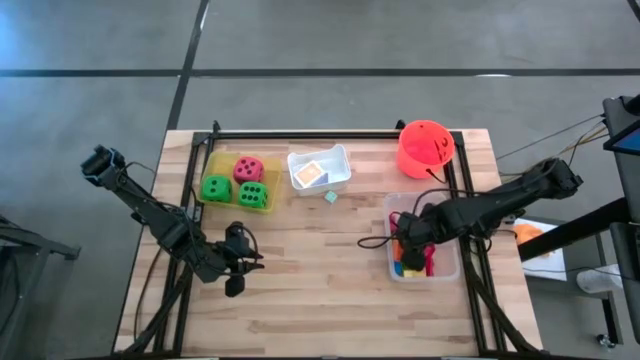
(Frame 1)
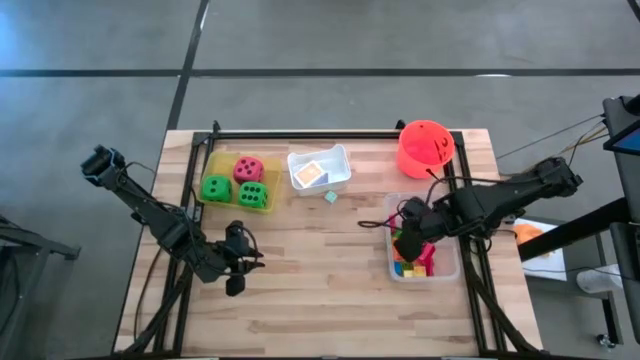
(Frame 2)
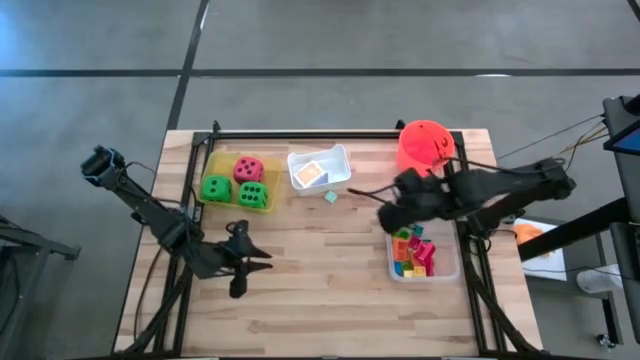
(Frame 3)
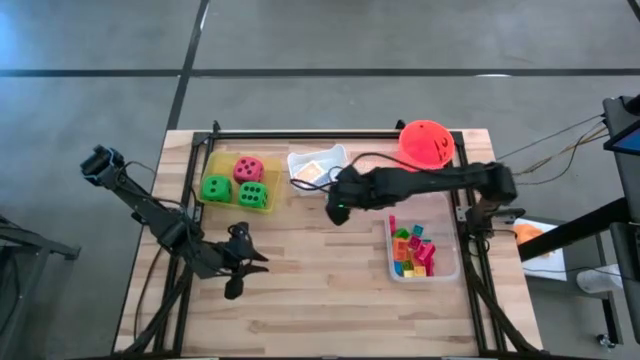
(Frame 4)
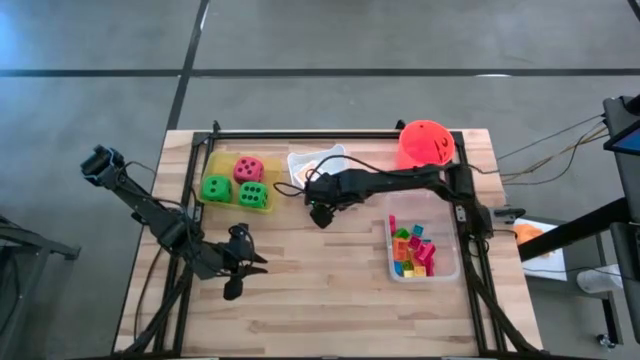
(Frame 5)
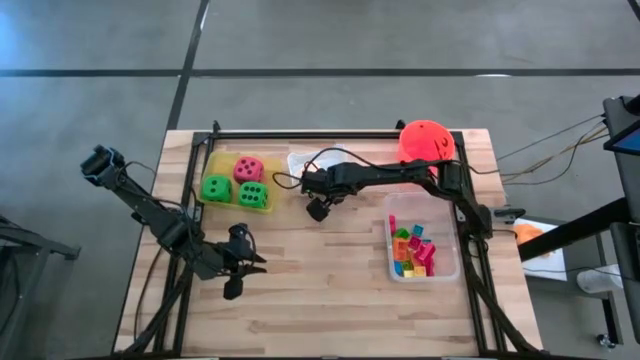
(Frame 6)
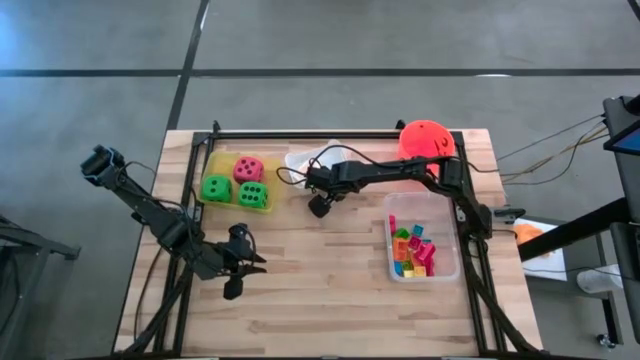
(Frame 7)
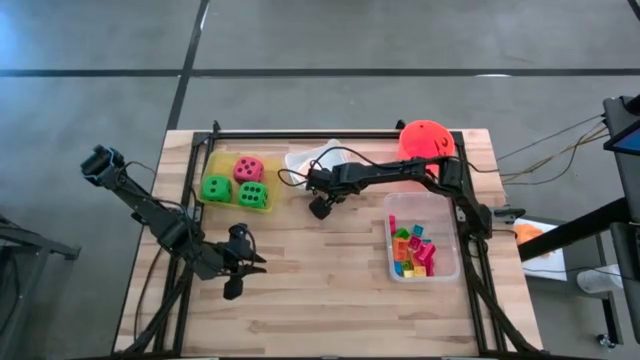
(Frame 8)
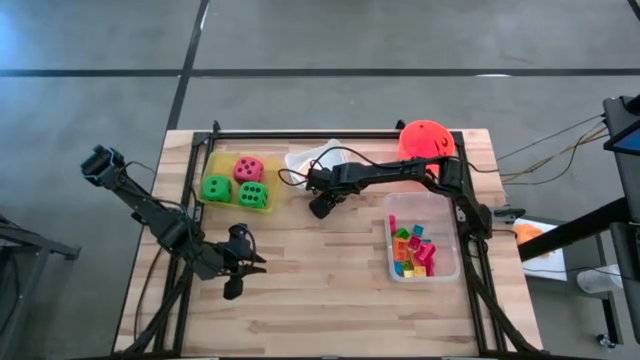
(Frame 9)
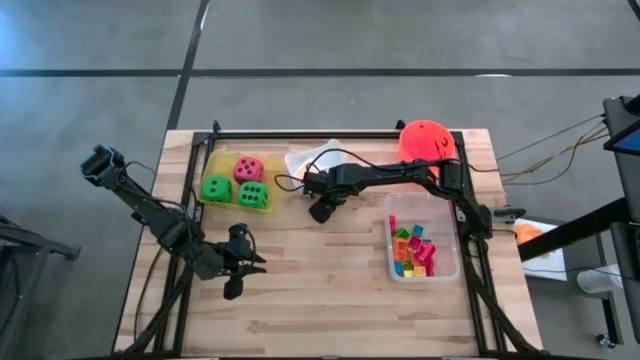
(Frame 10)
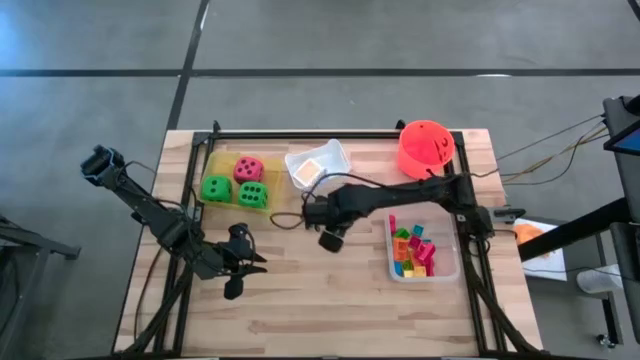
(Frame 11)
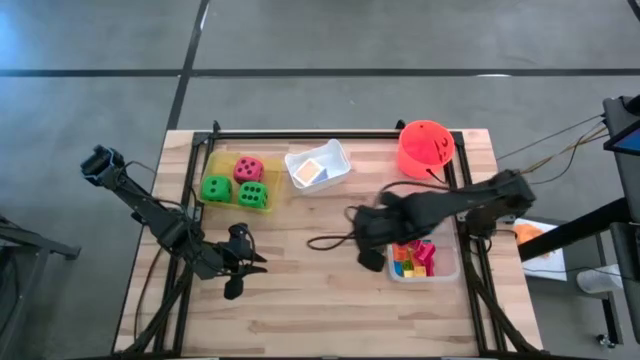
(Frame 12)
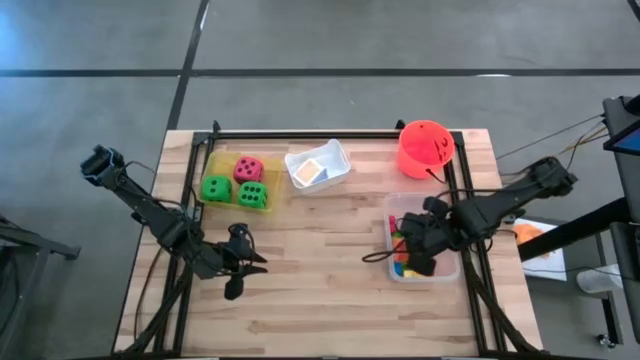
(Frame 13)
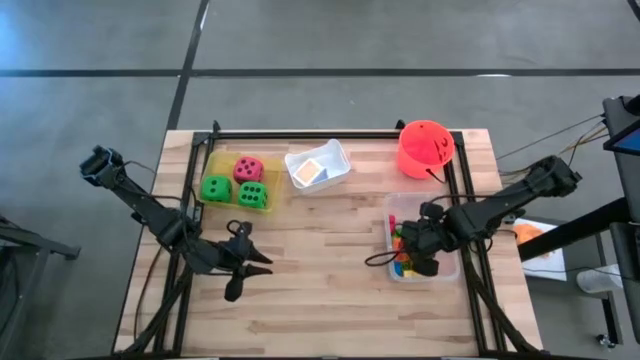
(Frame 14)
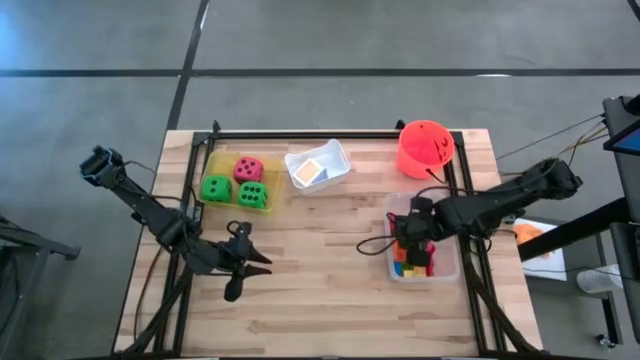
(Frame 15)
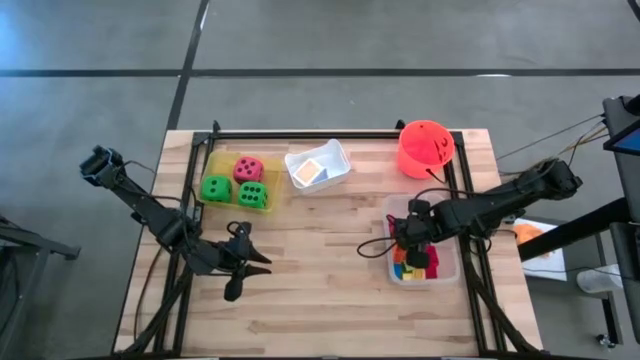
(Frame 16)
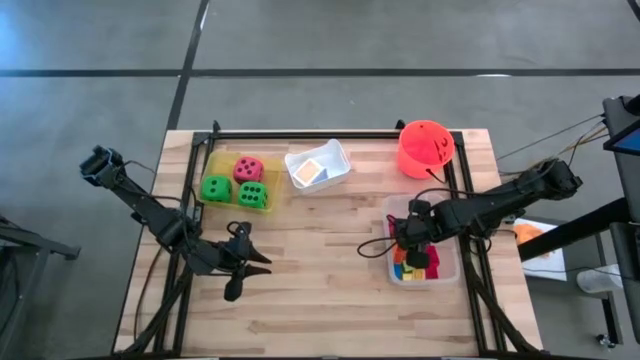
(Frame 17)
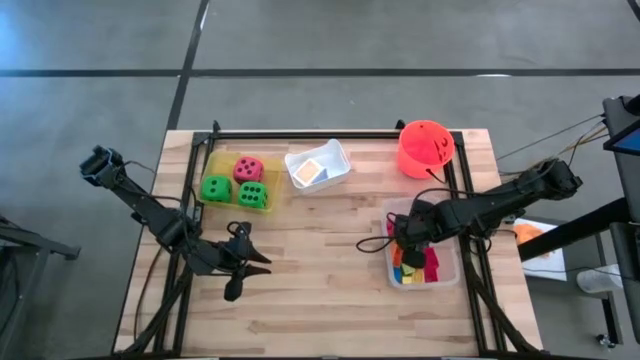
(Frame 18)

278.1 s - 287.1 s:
Task: Pick & Place Toys
Put the light blue game piece into the transparent bin

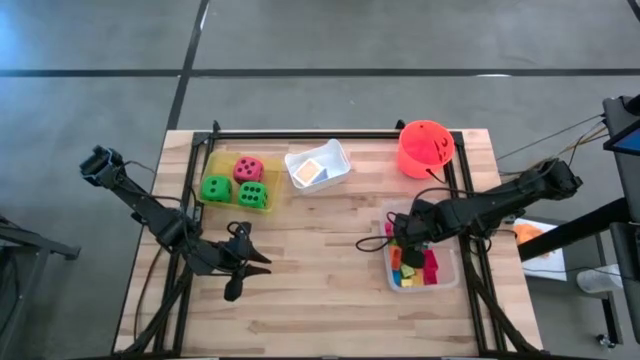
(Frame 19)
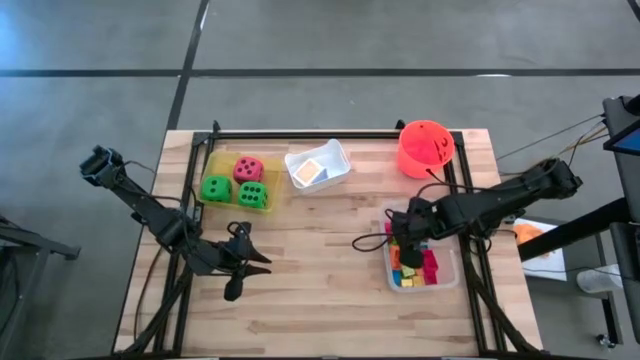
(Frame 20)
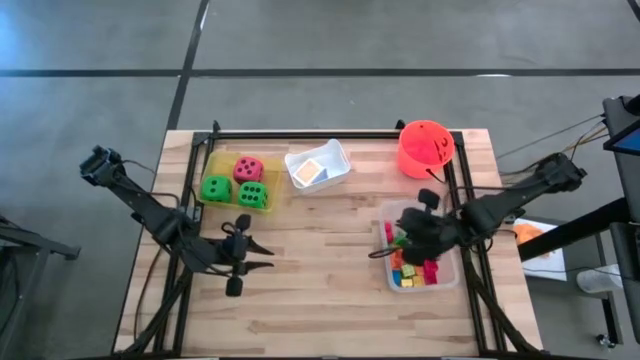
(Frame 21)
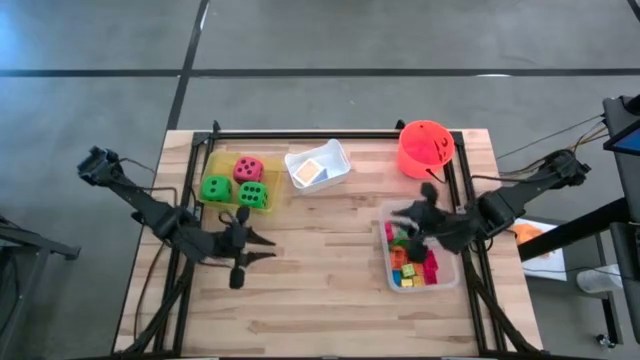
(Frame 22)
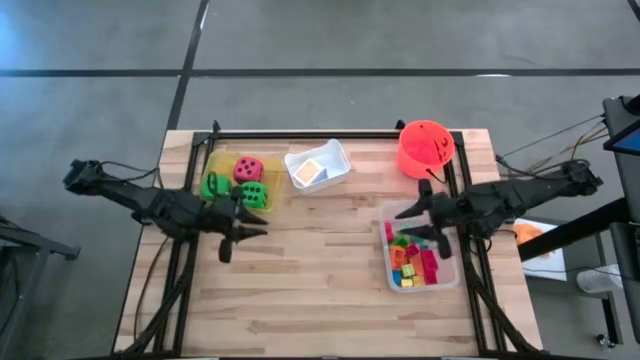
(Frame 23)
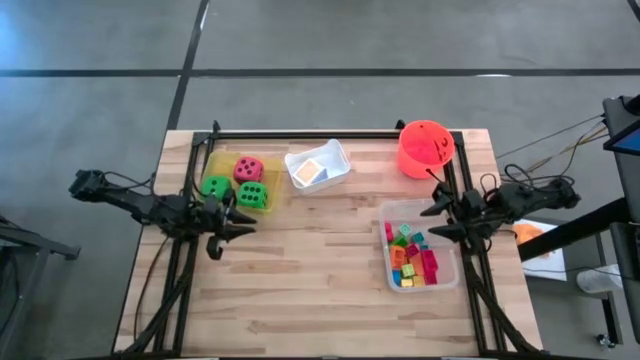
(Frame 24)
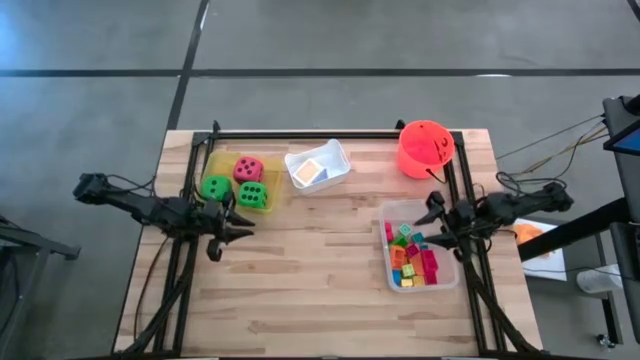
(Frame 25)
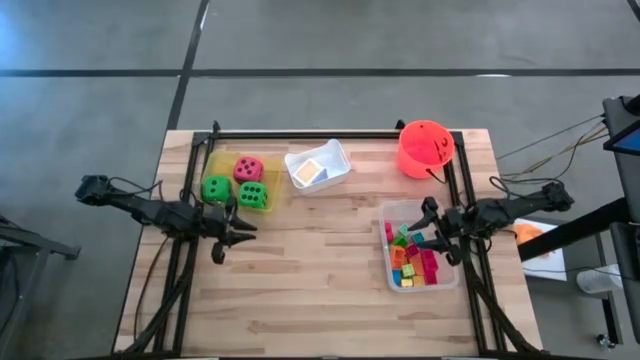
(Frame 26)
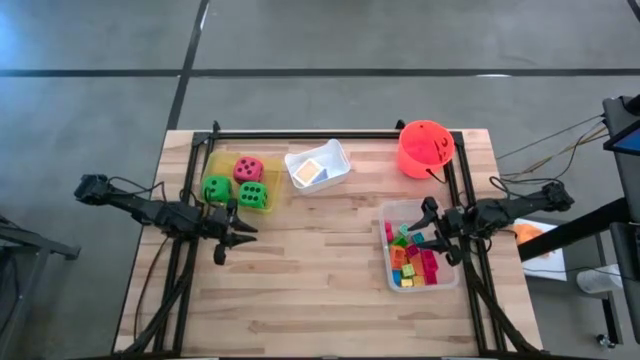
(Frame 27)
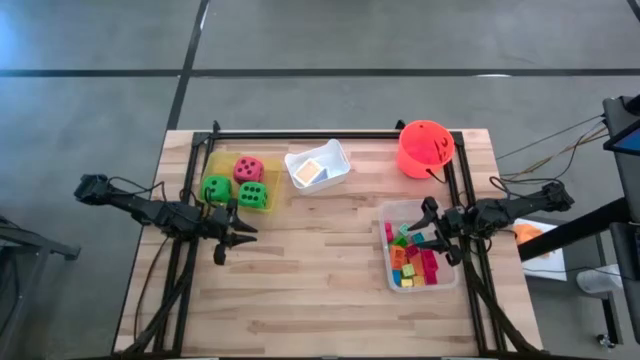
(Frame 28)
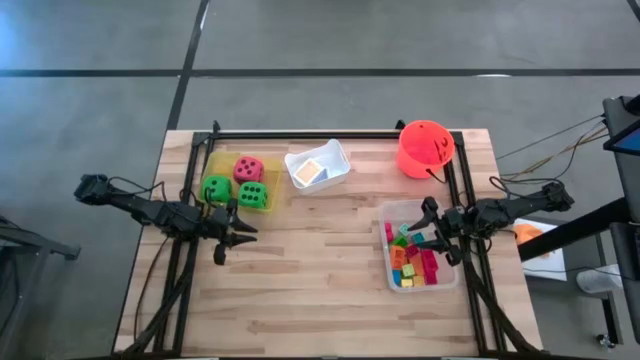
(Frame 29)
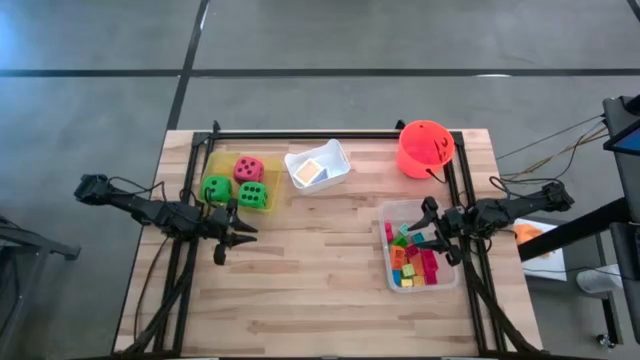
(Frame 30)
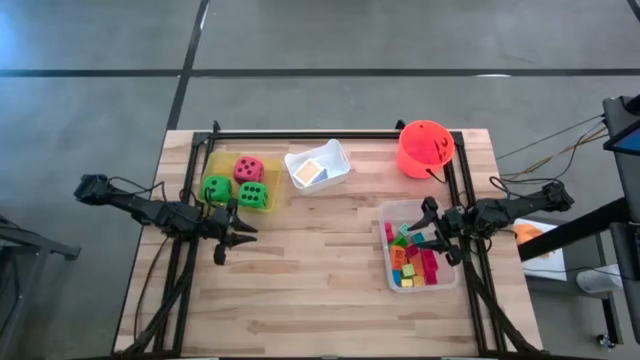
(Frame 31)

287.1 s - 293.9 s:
Return to Home Position

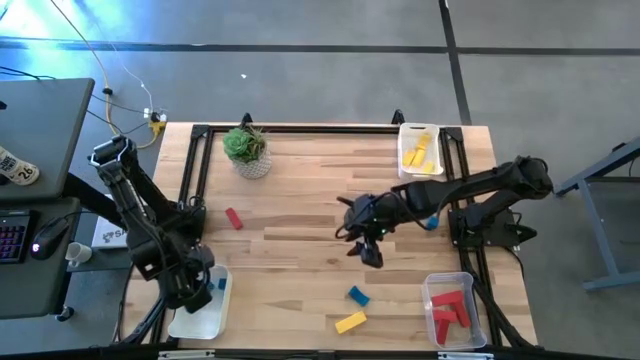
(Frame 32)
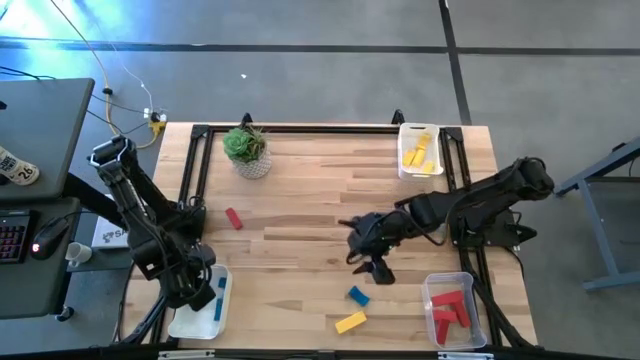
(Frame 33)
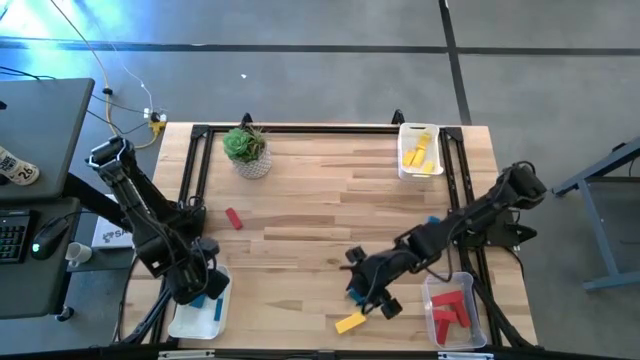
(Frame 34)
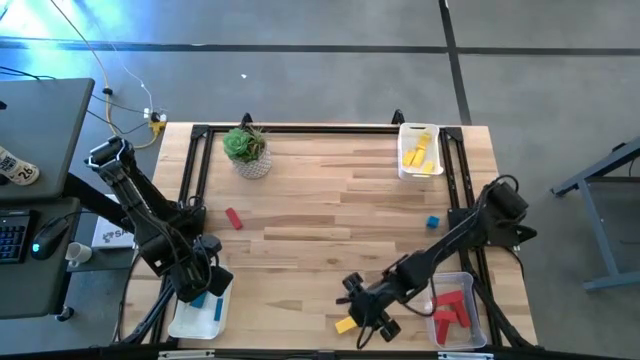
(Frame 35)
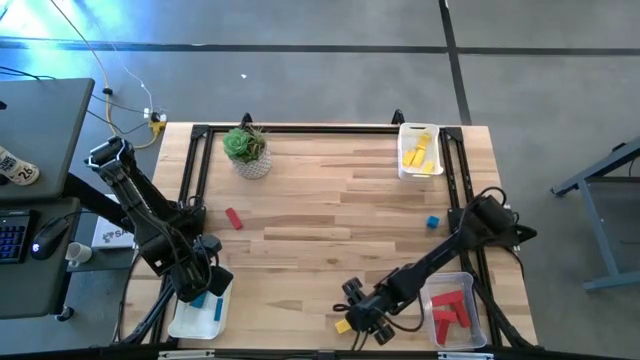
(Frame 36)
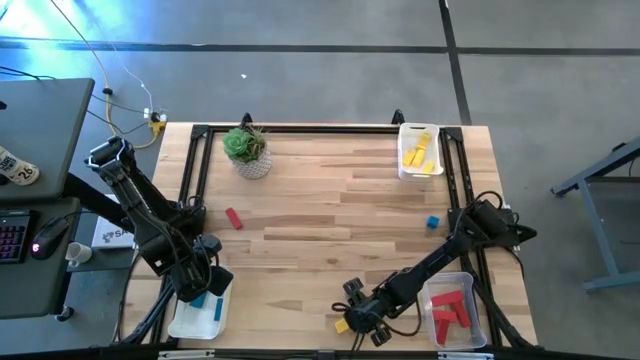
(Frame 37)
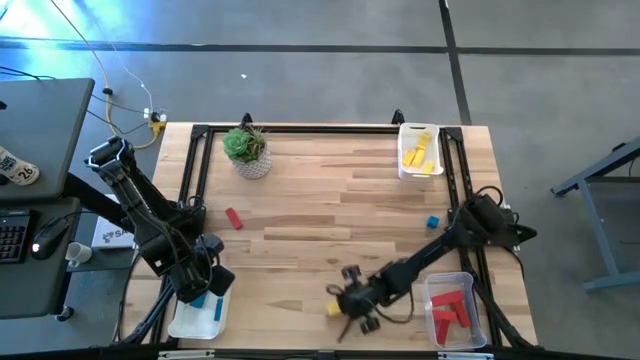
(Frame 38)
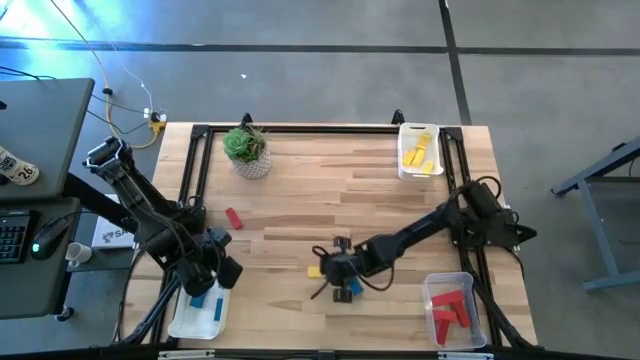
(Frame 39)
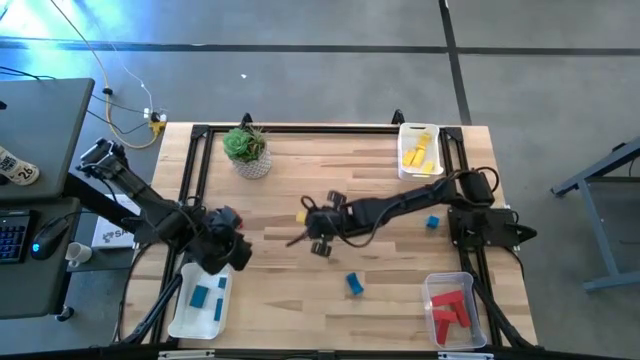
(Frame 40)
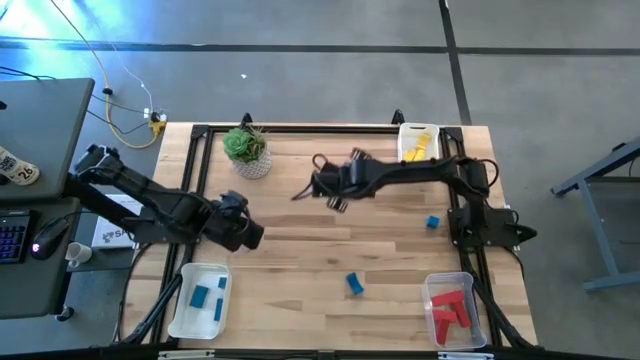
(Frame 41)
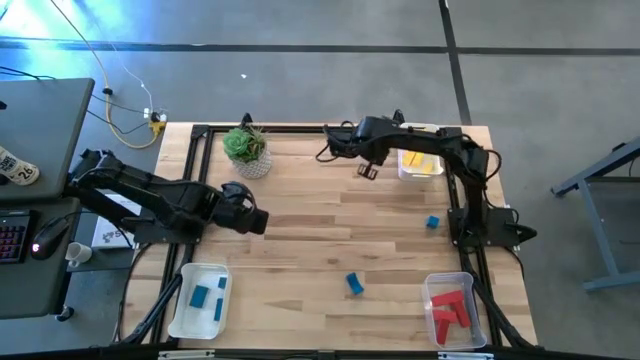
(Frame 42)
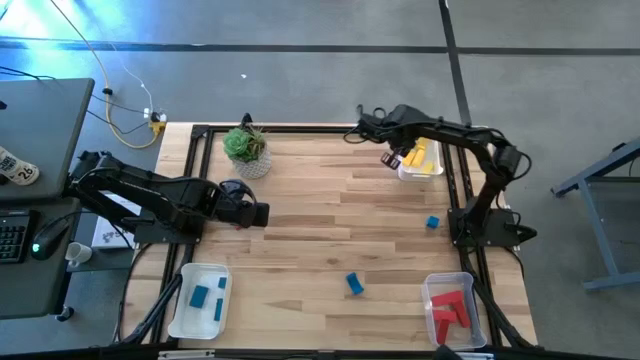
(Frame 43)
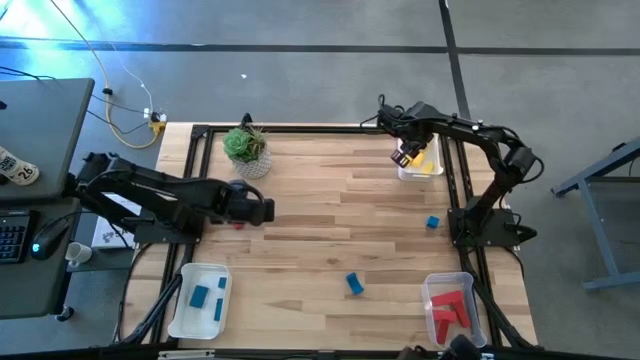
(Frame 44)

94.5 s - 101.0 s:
Task: Sort & place blocks by color
Put the yellow block into the top white bin
